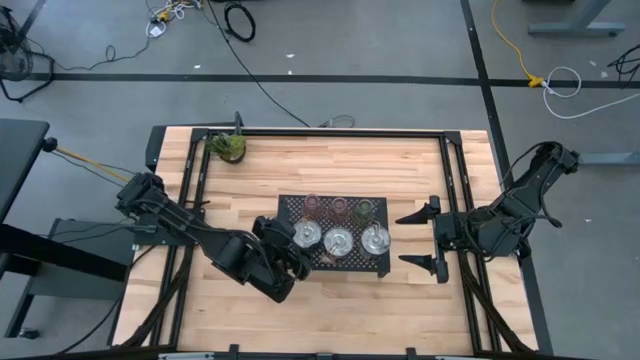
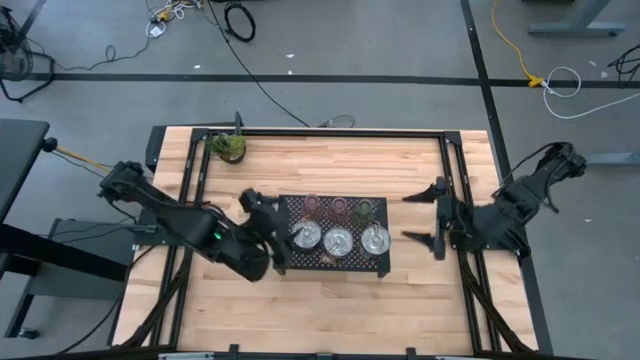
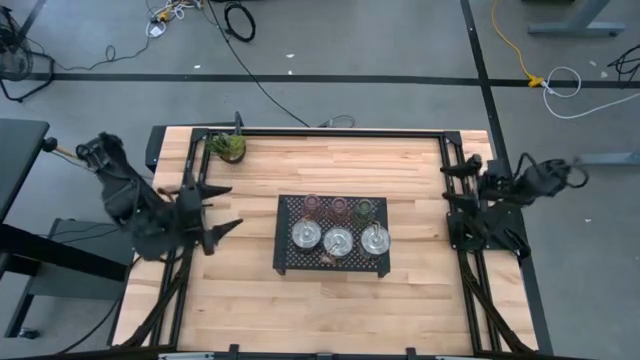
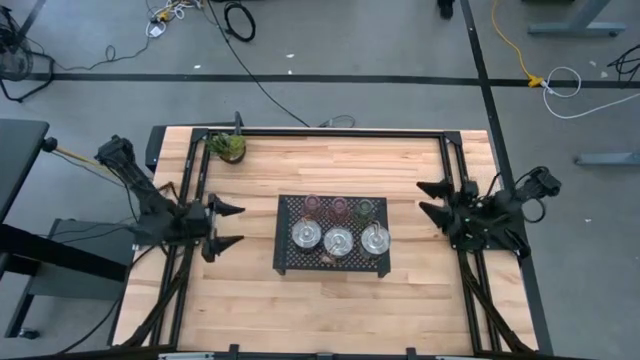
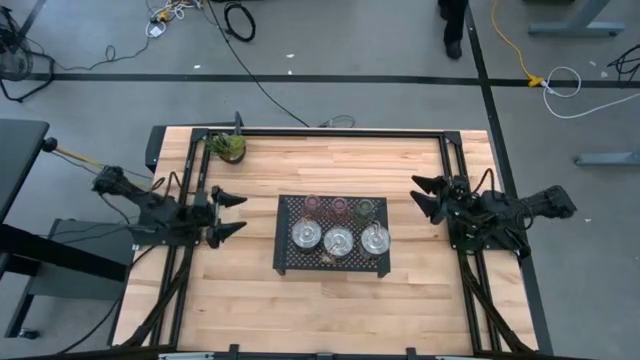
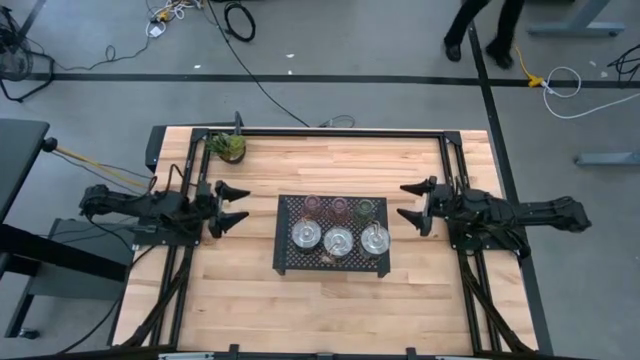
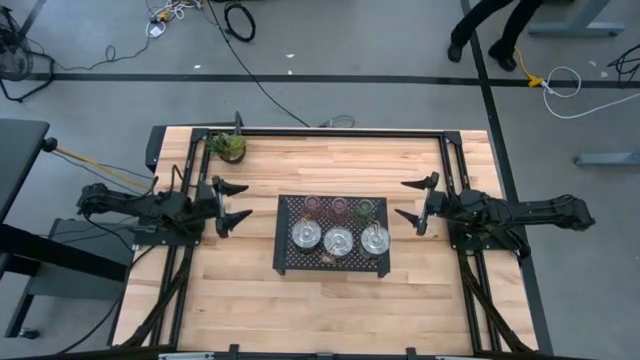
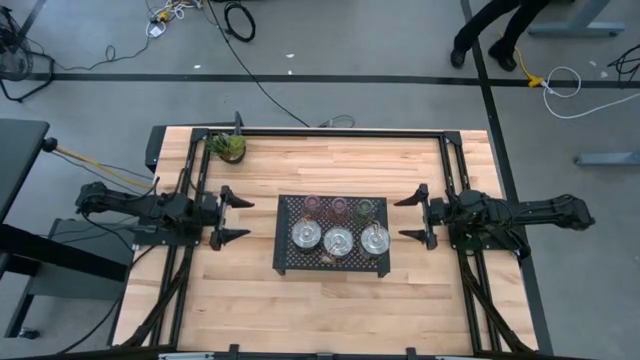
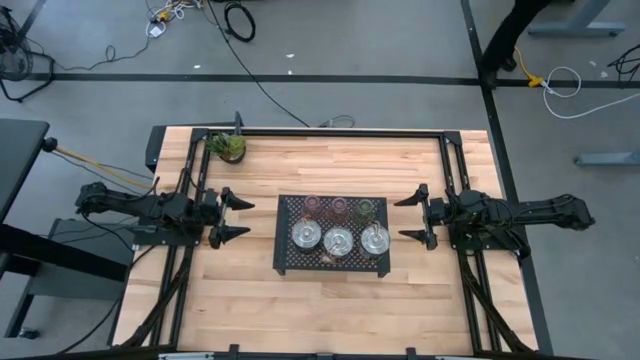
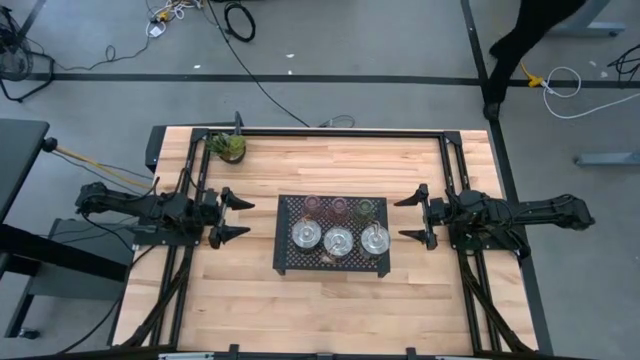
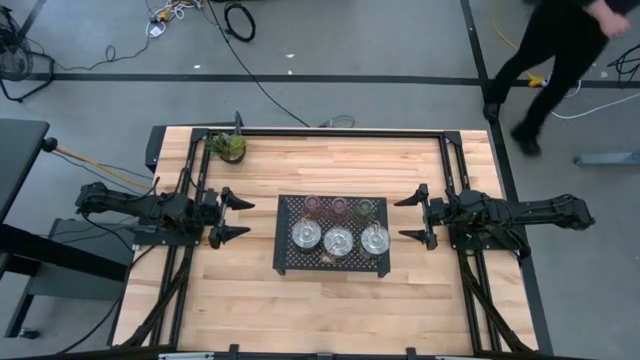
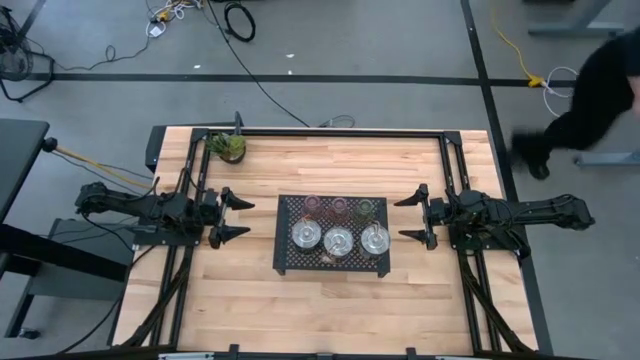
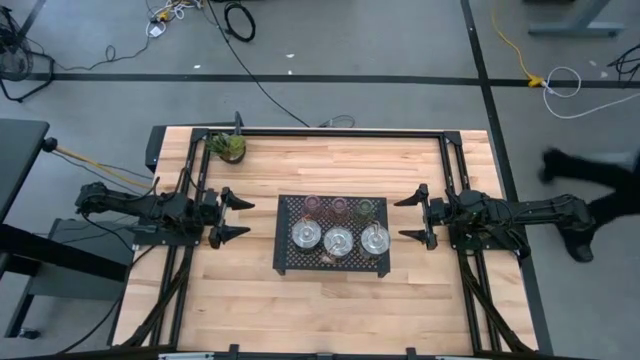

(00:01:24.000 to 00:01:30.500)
Task: Pick & Place candle stick holders
Return to Home Position

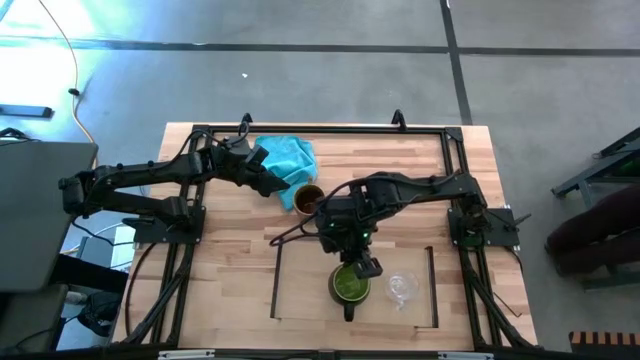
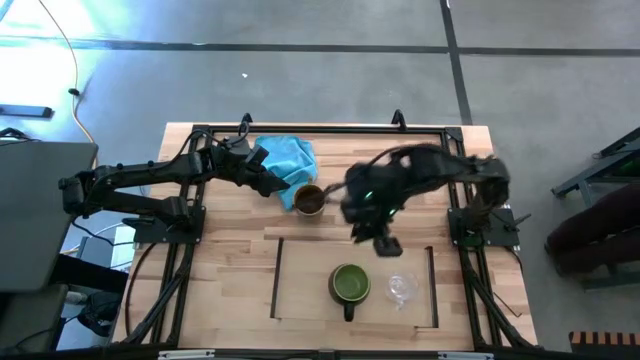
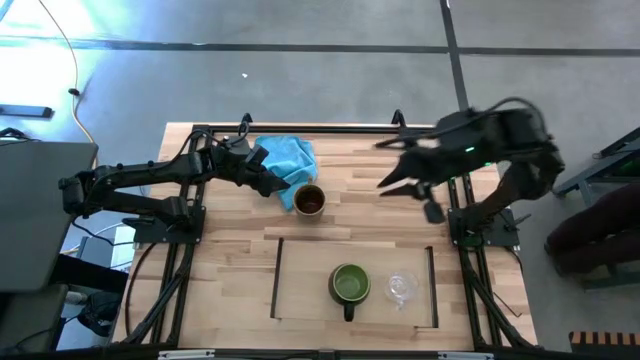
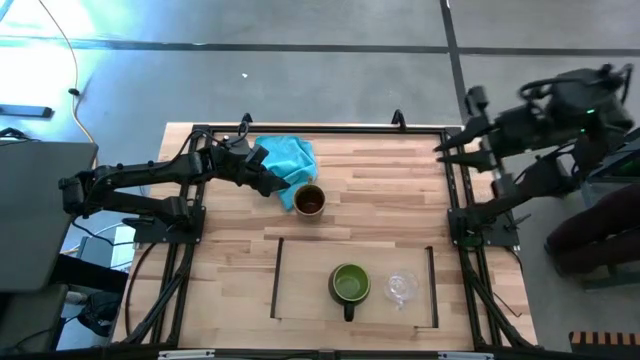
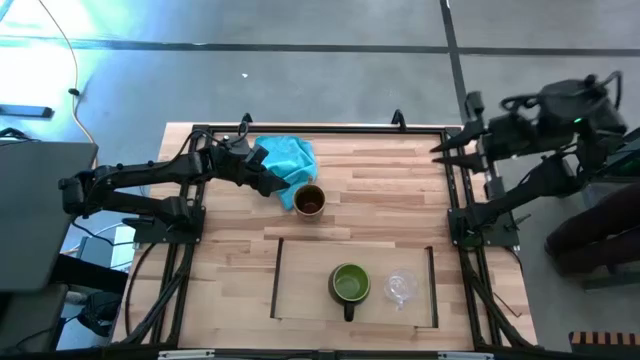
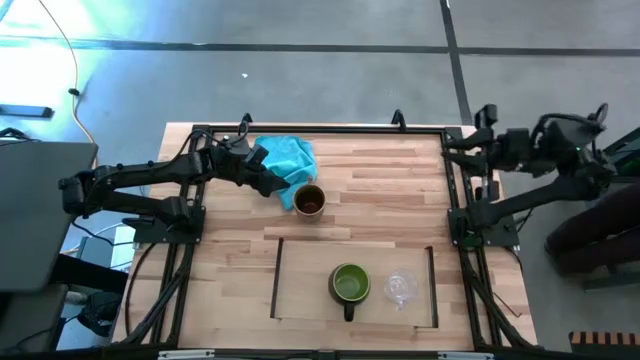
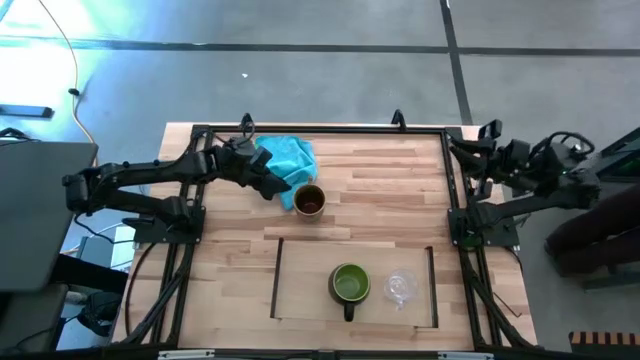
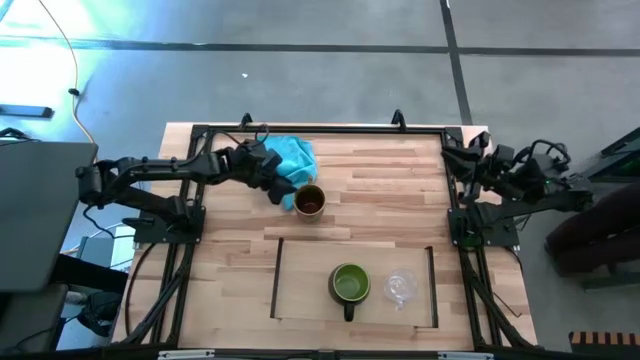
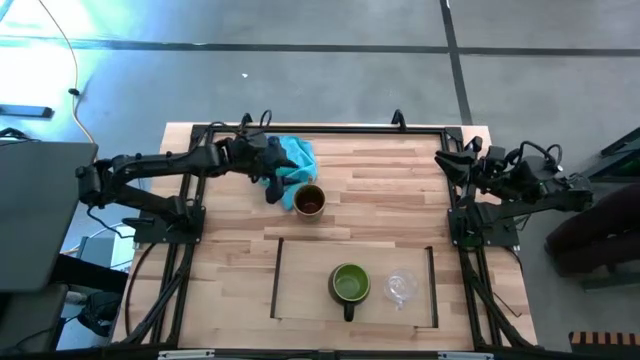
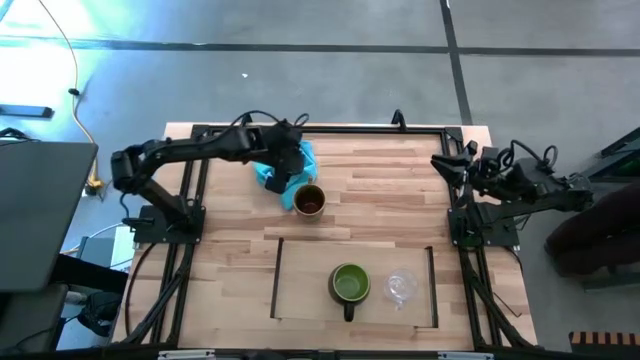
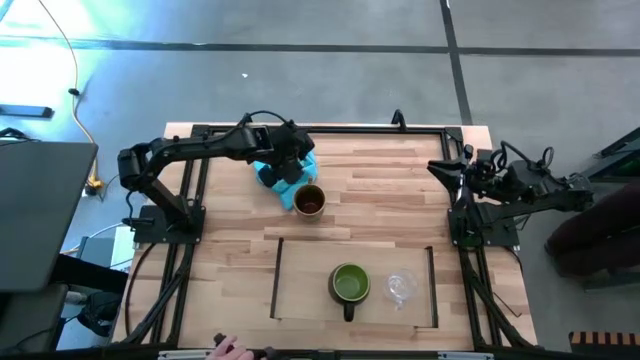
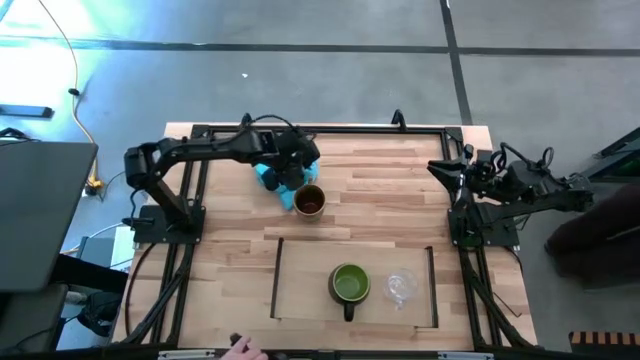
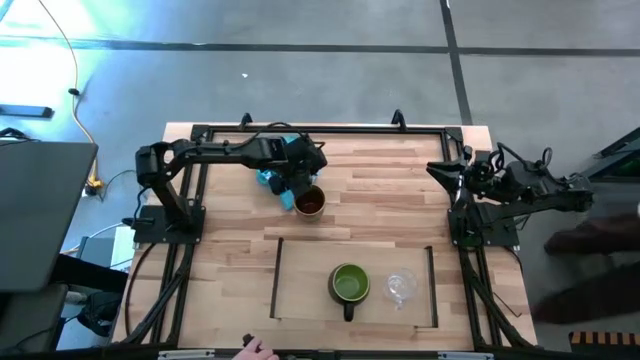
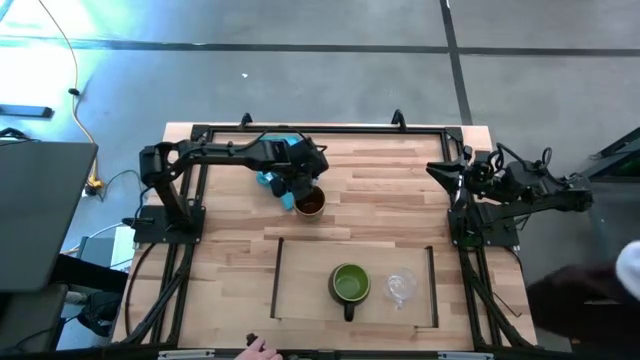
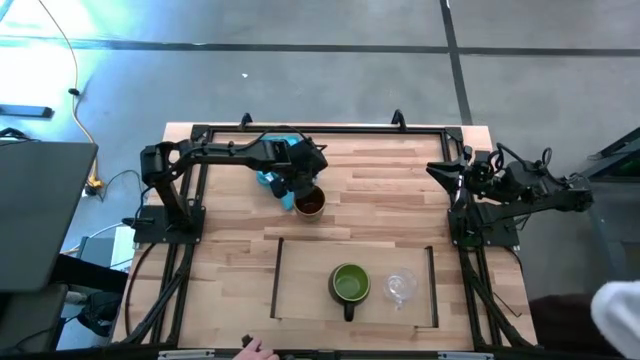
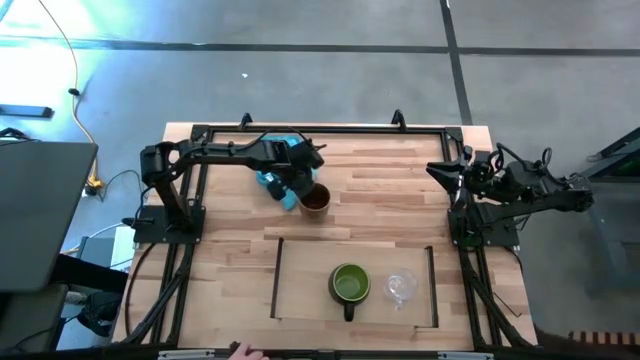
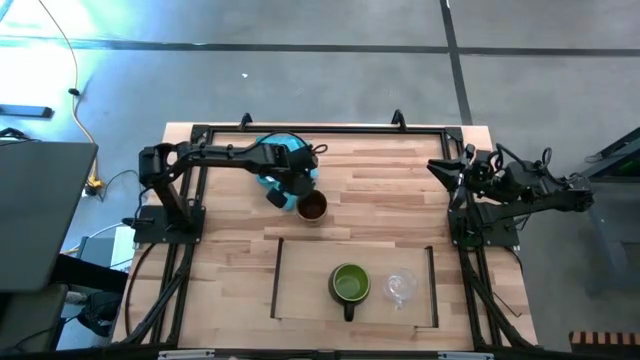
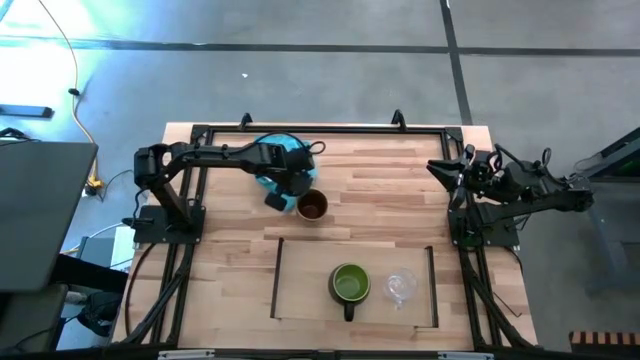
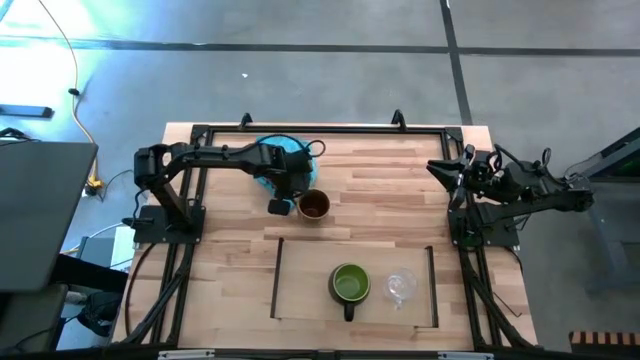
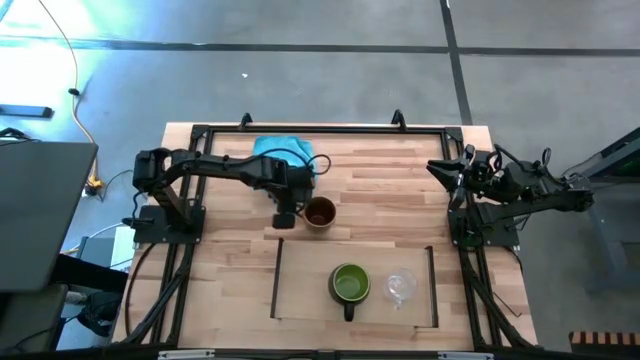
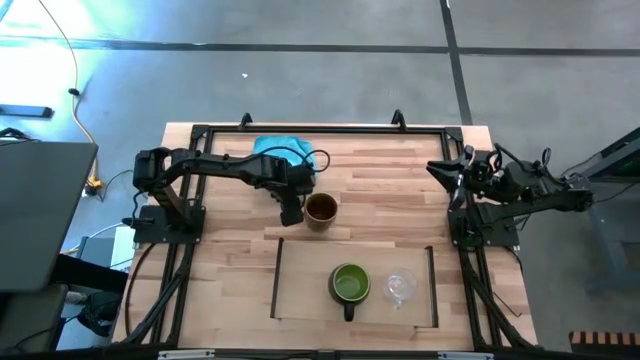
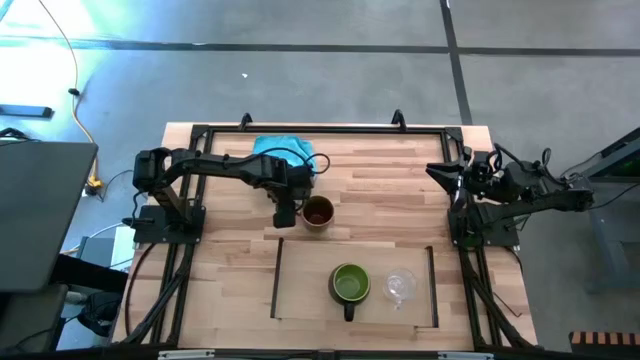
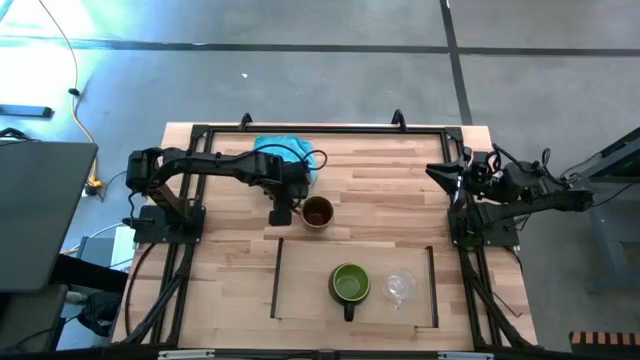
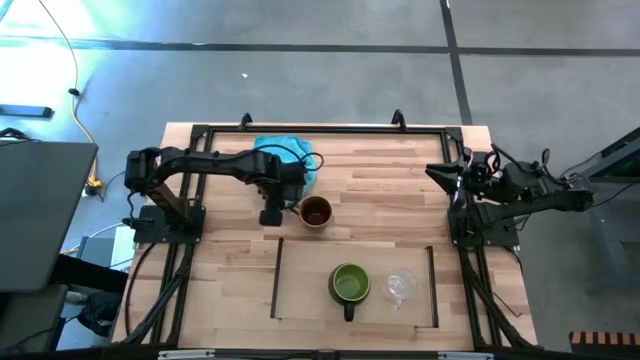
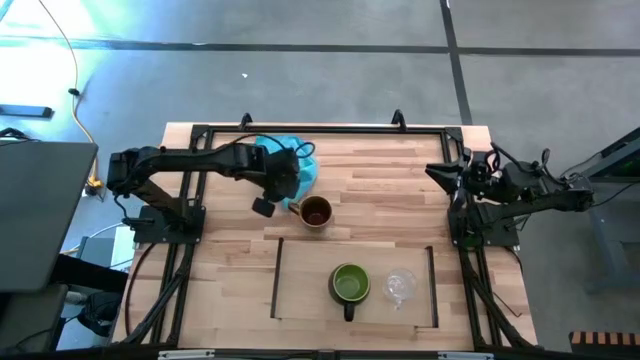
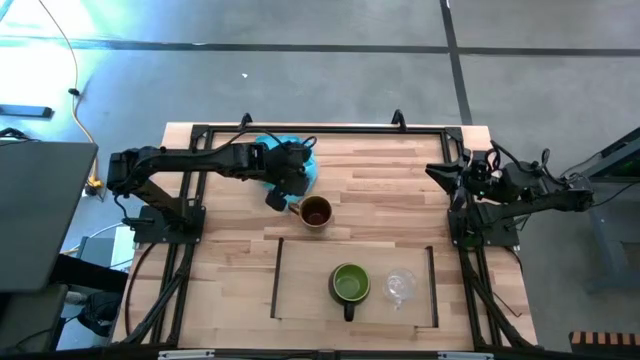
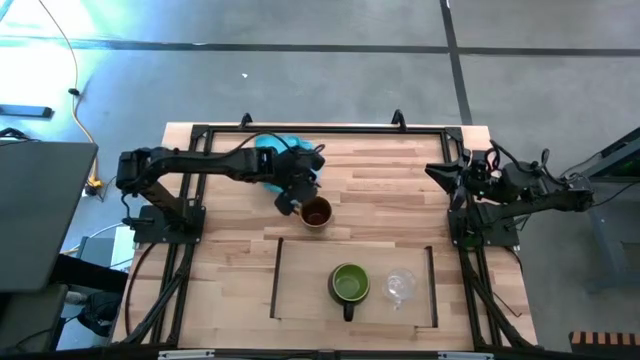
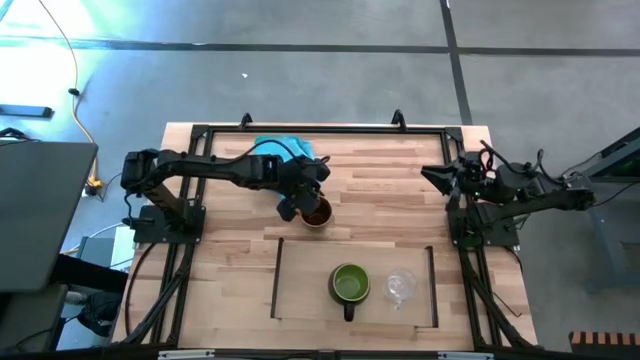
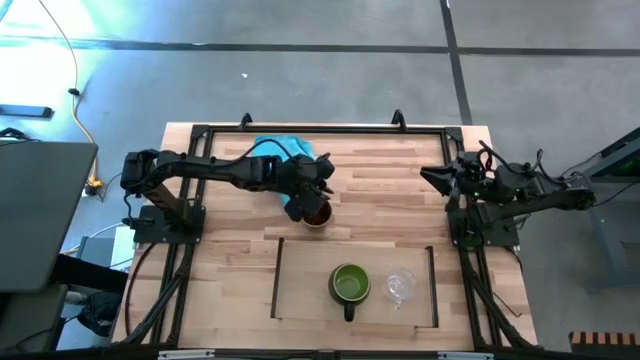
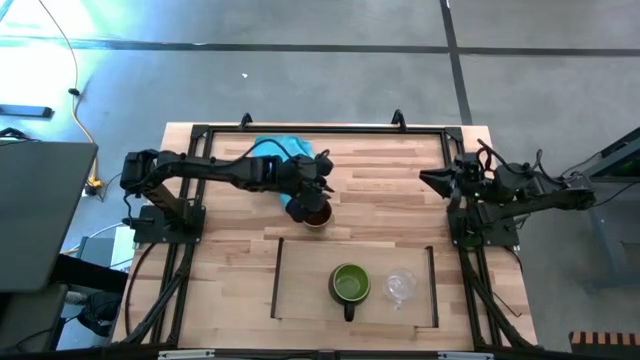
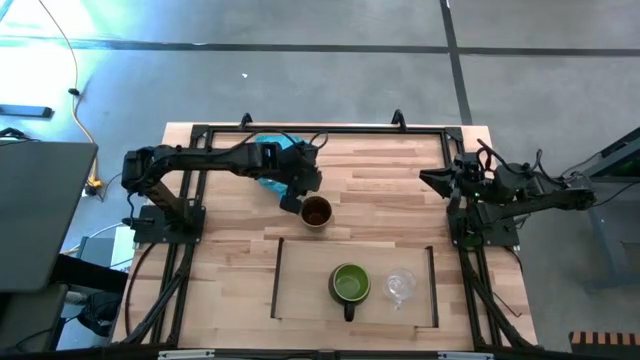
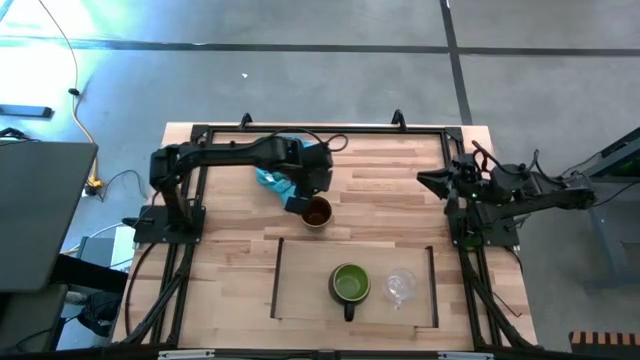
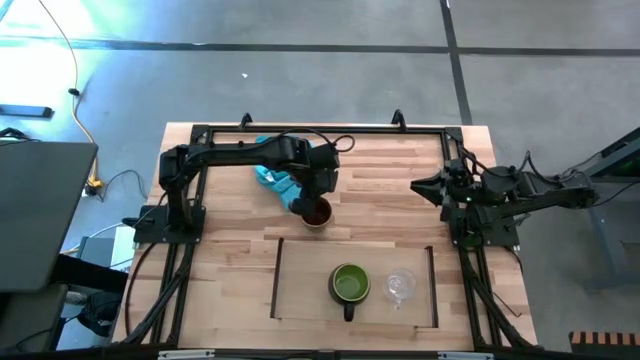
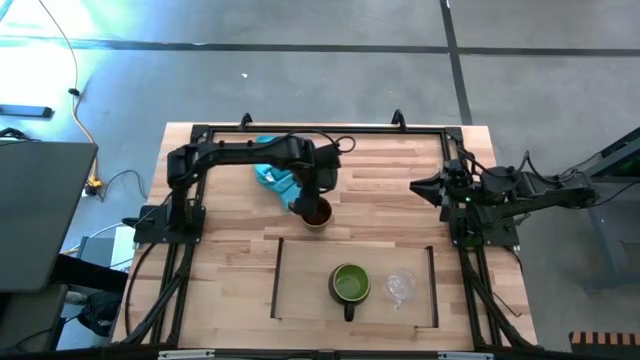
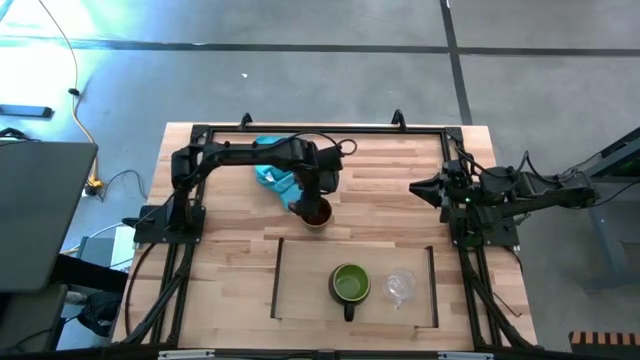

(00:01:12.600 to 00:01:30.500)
Task: Stack small to large cups/mugs on shelf
Put the brown mug on the shelf
